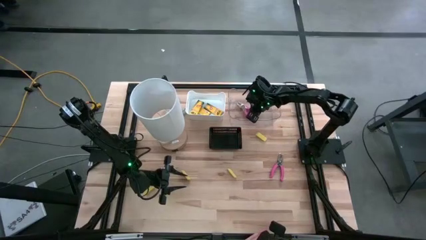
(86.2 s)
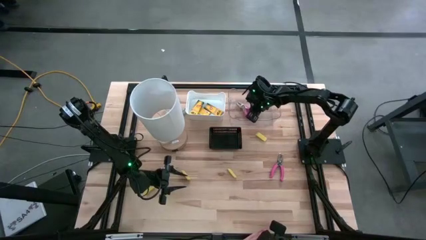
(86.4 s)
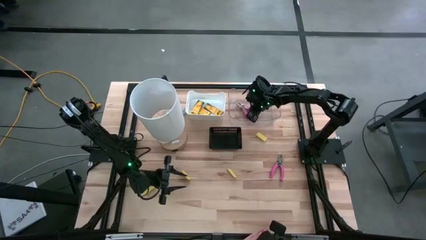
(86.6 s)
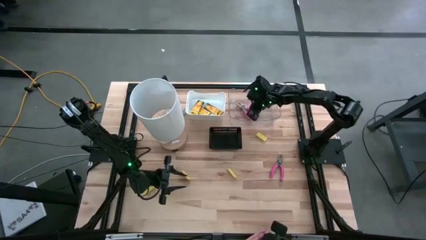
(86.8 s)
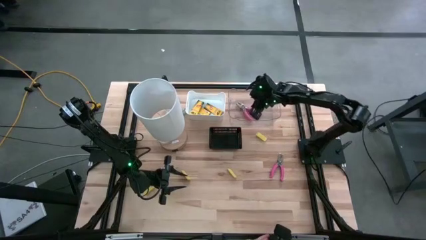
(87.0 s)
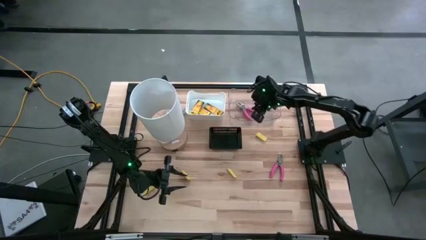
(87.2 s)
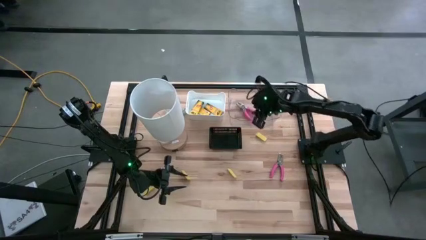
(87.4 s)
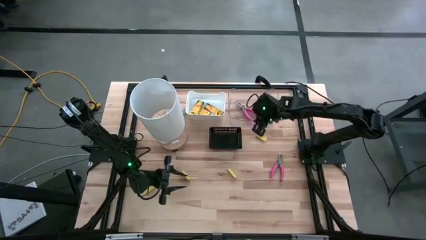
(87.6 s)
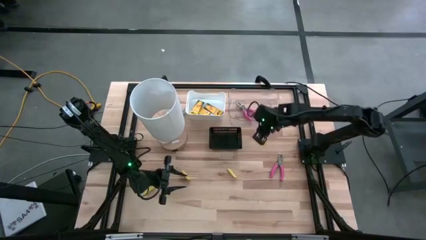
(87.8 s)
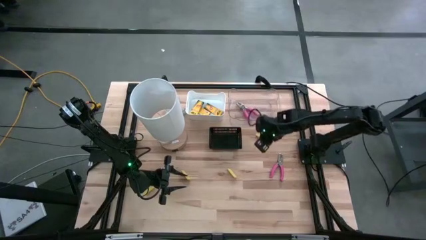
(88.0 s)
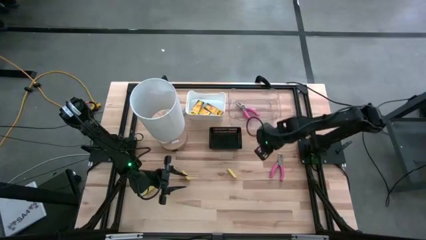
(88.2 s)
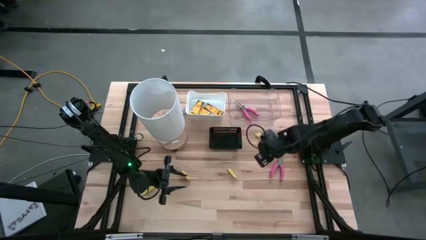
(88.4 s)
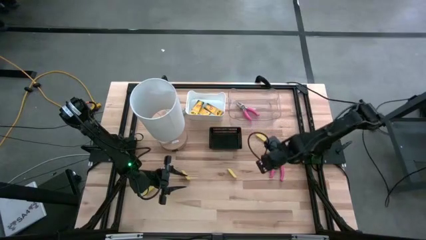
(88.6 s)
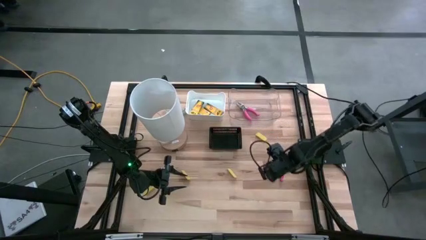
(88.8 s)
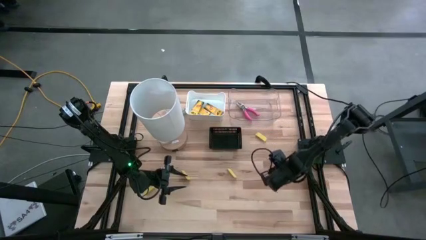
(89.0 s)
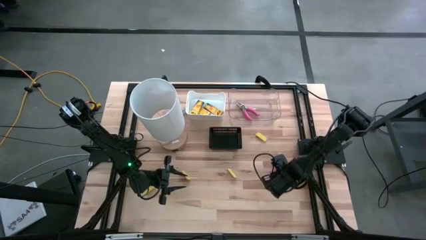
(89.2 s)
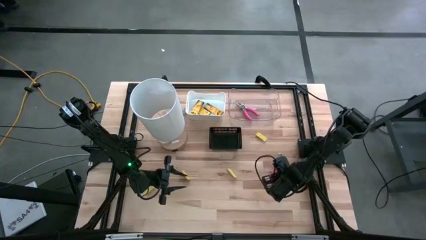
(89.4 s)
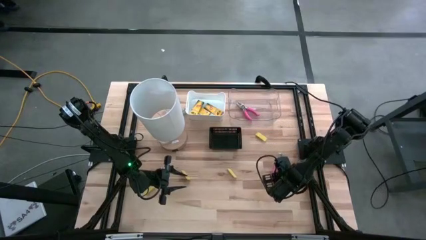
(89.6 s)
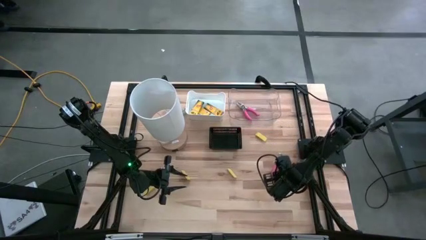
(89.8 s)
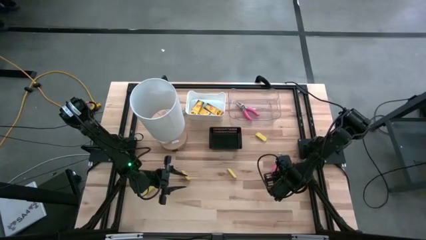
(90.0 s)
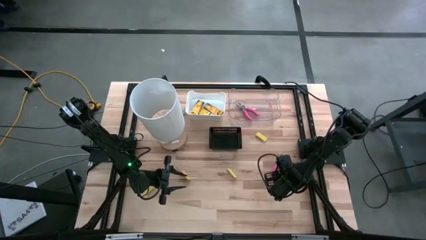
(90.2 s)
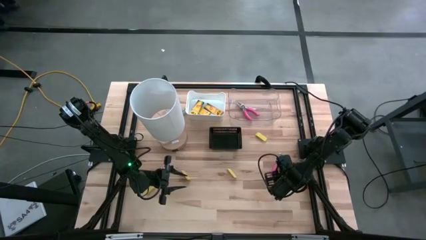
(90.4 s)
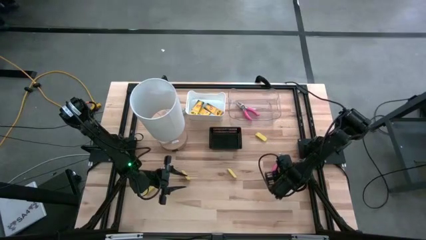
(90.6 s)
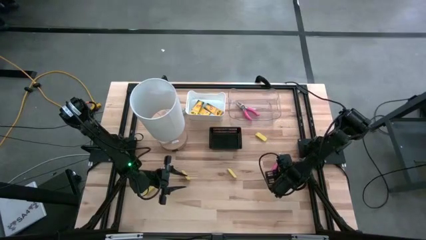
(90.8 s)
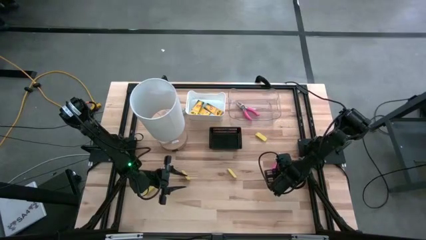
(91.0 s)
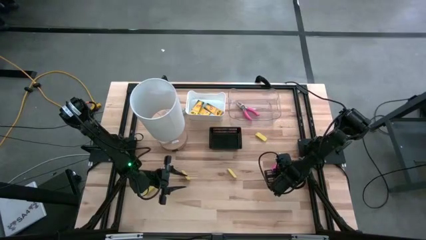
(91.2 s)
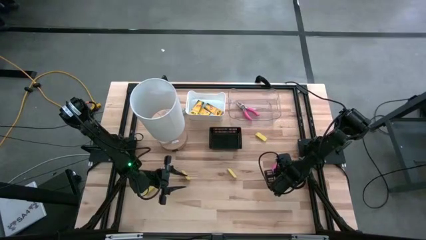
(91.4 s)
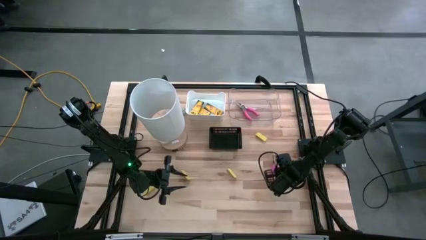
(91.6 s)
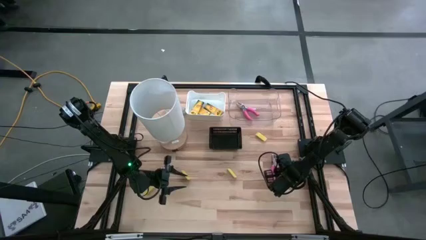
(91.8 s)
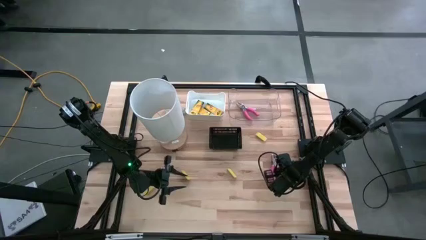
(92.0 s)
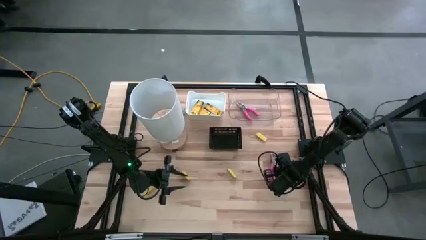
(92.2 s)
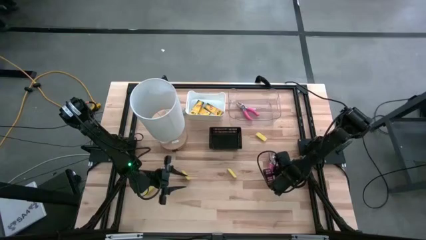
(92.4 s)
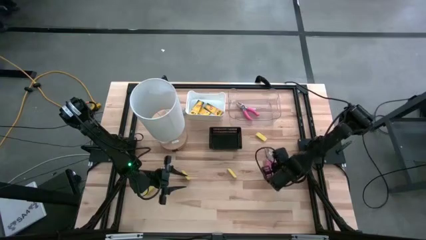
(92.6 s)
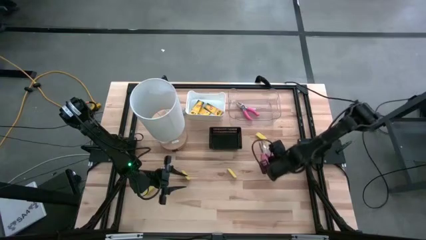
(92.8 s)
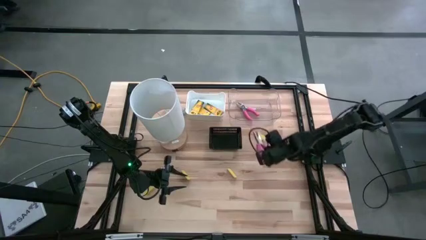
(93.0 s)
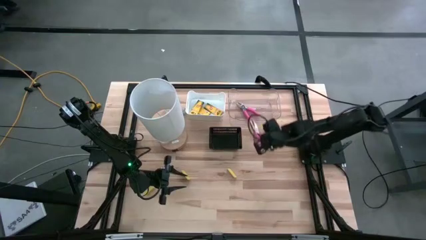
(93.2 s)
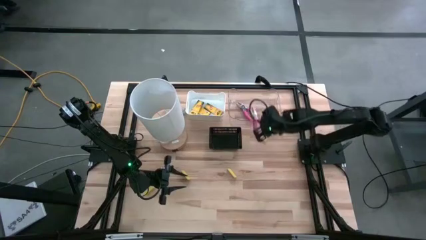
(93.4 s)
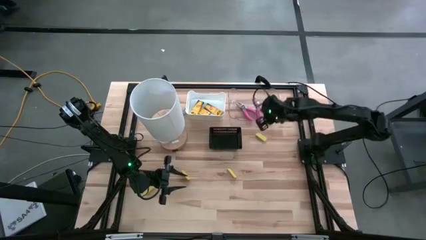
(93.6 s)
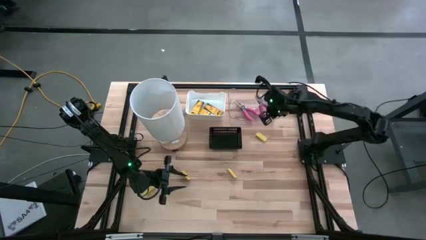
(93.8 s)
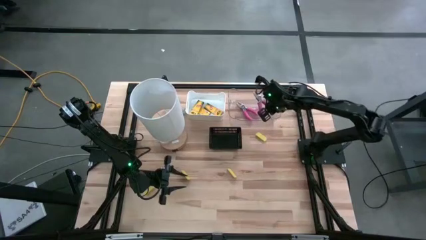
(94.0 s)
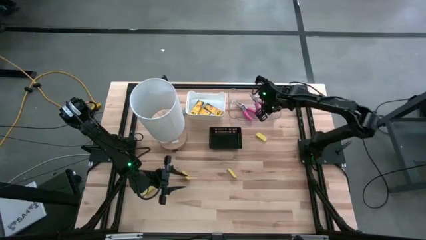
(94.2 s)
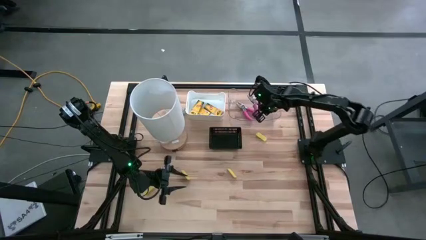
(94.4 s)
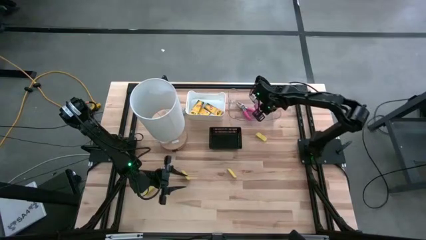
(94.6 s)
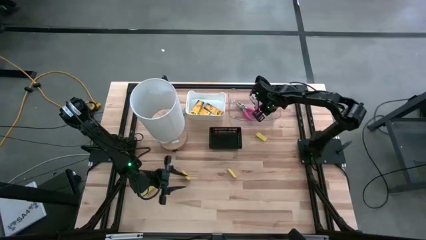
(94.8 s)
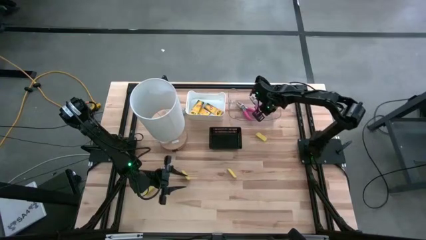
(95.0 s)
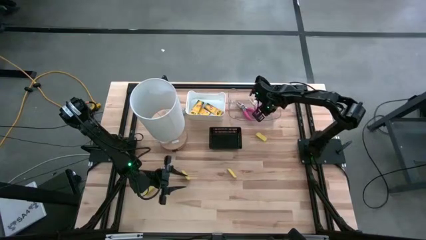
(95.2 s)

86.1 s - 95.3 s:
Task: Pick & Place School Supplies
Put the pink hole puncher into the transparent bin

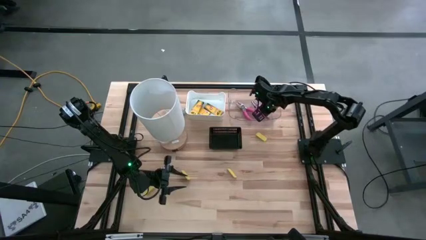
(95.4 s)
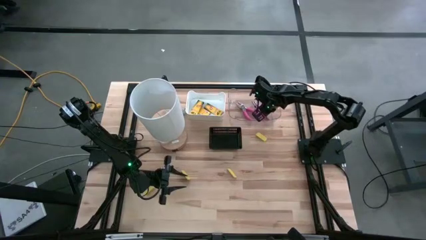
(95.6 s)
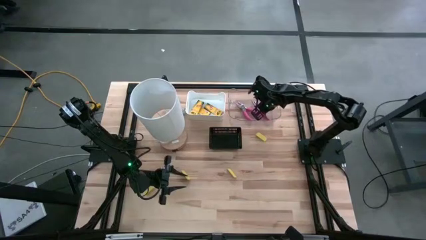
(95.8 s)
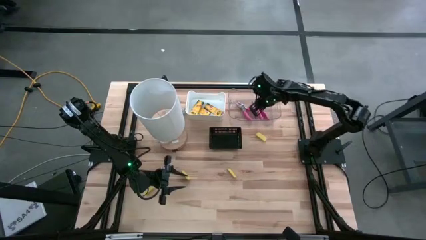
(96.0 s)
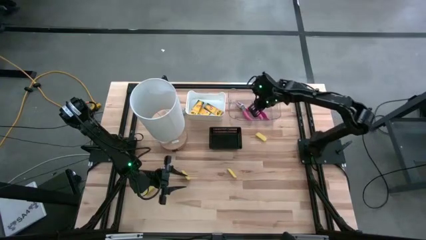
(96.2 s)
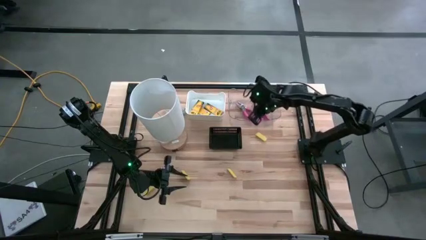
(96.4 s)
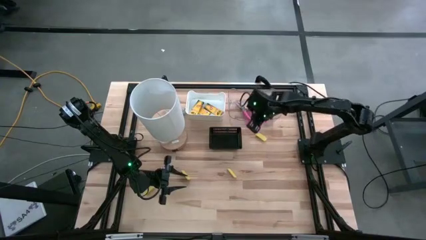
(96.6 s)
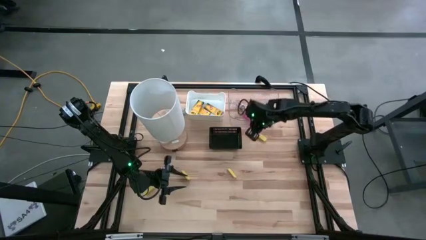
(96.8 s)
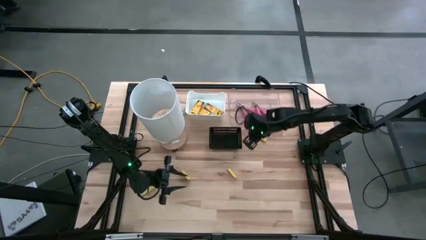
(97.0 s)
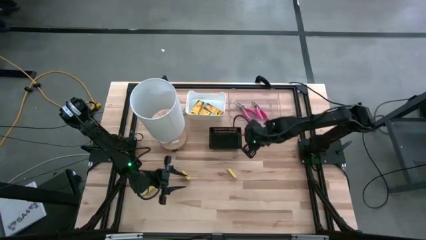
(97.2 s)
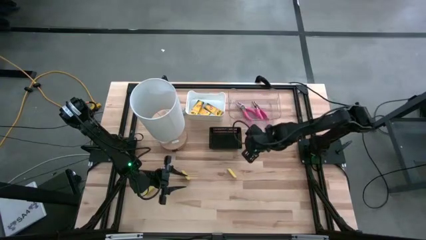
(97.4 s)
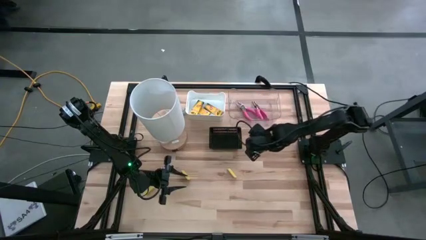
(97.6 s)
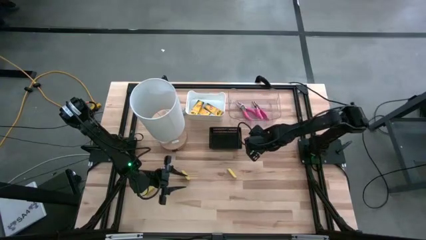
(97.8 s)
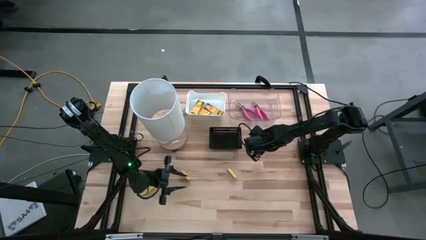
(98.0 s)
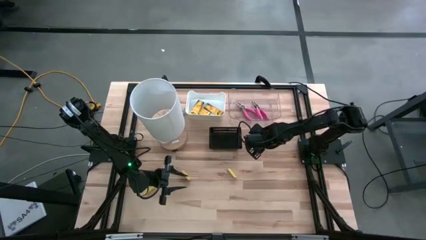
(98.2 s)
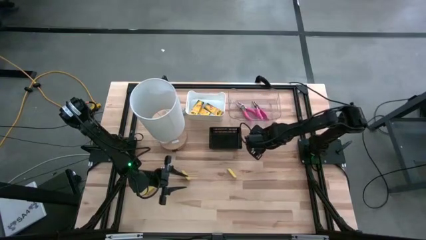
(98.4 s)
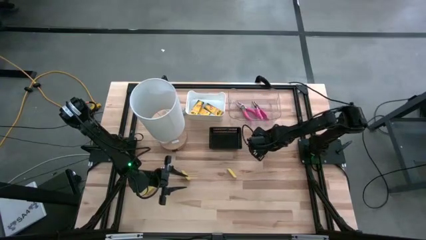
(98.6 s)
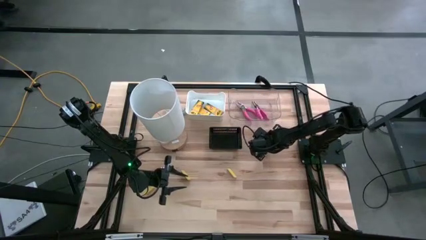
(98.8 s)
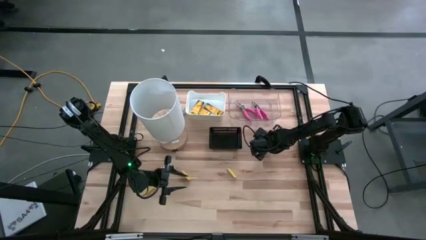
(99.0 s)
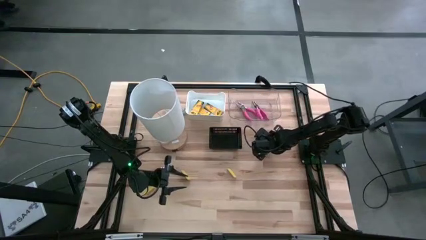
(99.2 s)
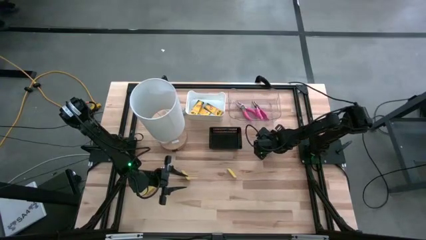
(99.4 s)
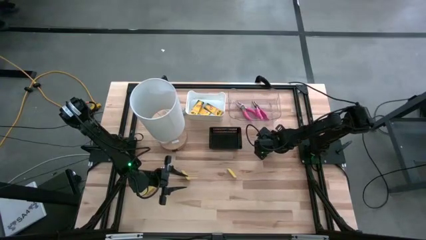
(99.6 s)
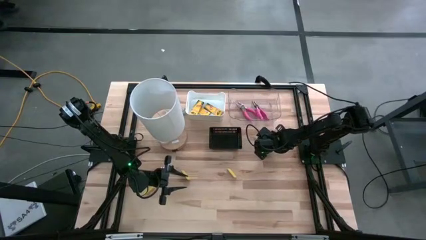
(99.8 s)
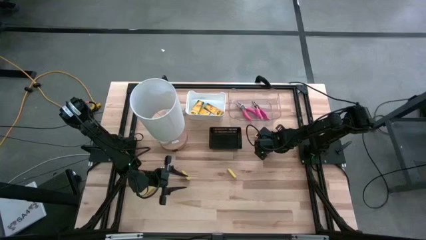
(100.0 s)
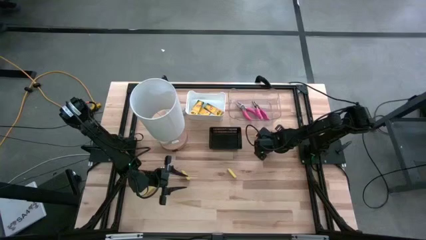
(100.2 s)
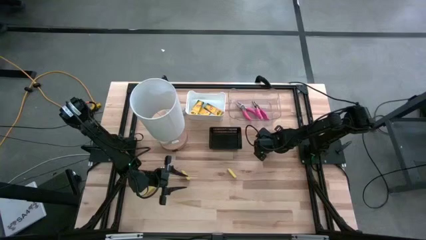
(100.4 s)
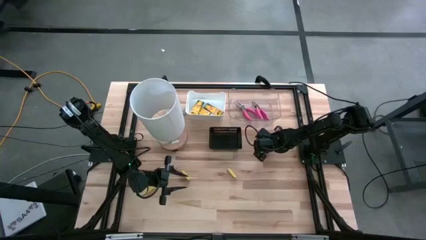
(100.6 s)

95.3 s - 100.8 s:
Put the yellow eraser into the black bin
